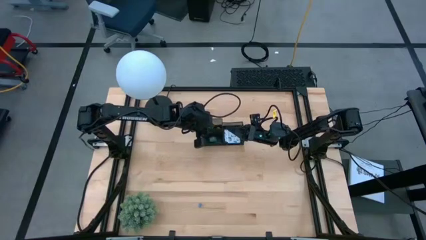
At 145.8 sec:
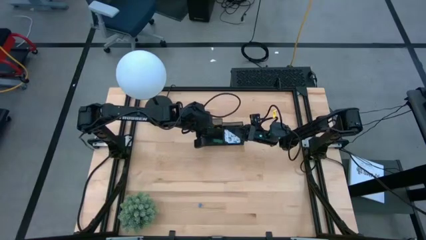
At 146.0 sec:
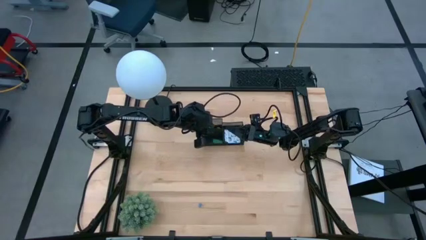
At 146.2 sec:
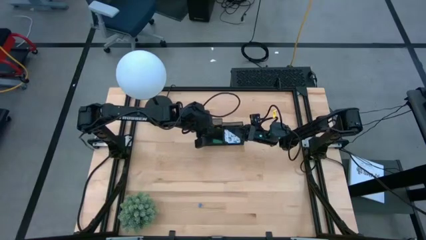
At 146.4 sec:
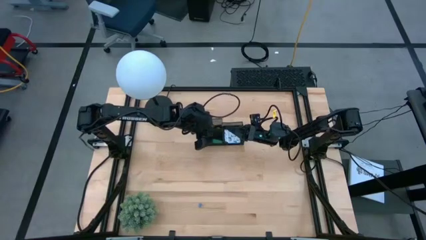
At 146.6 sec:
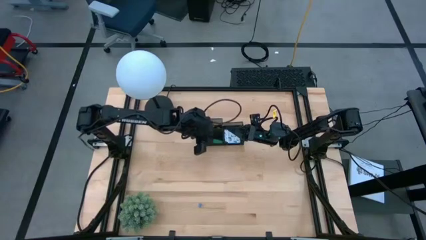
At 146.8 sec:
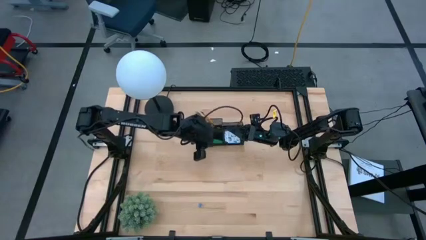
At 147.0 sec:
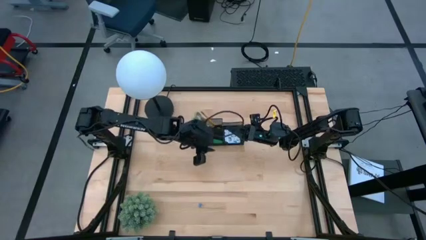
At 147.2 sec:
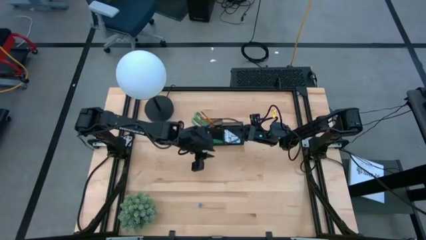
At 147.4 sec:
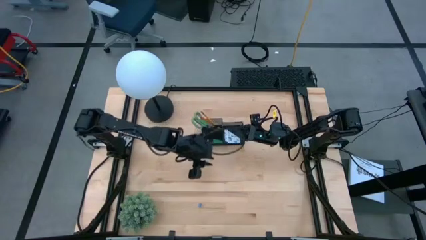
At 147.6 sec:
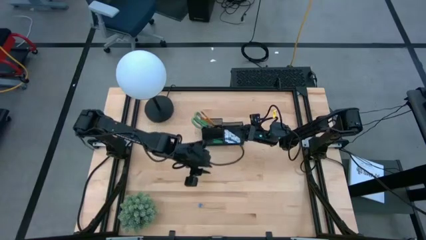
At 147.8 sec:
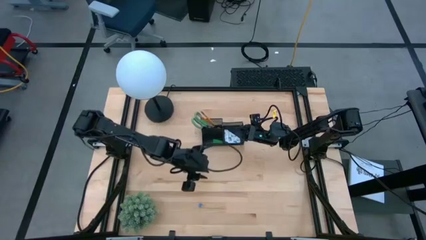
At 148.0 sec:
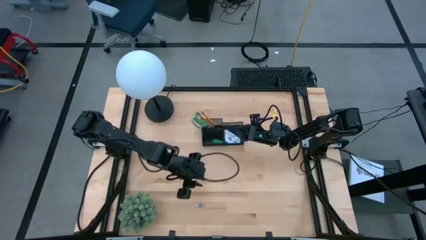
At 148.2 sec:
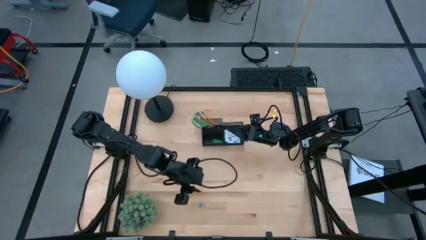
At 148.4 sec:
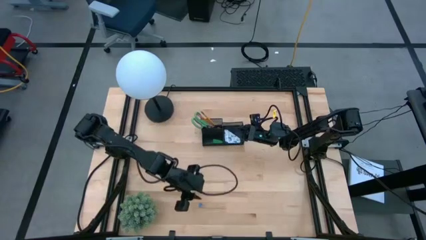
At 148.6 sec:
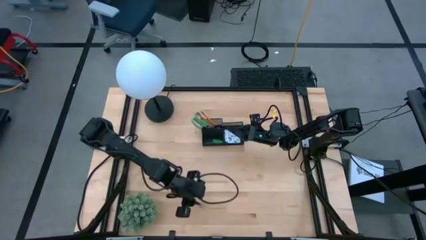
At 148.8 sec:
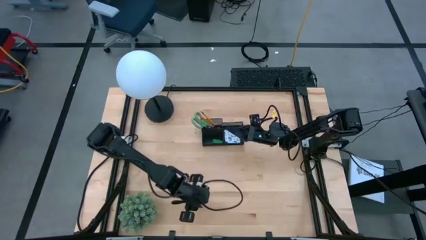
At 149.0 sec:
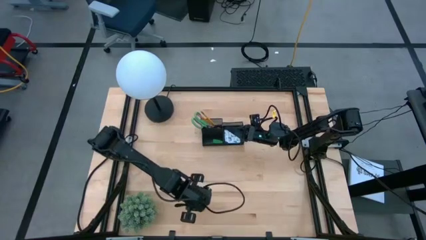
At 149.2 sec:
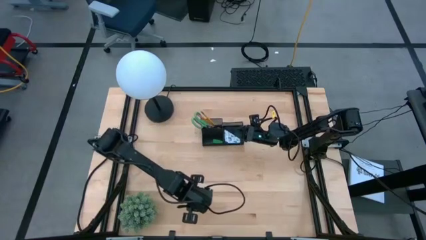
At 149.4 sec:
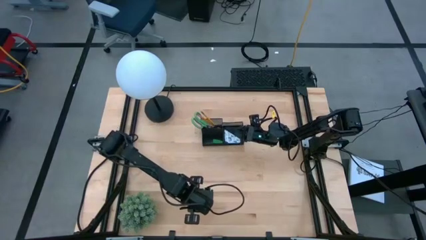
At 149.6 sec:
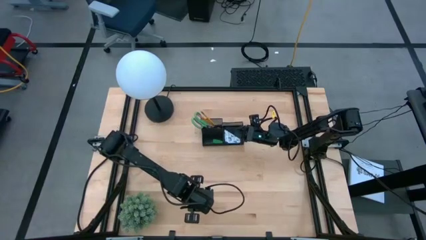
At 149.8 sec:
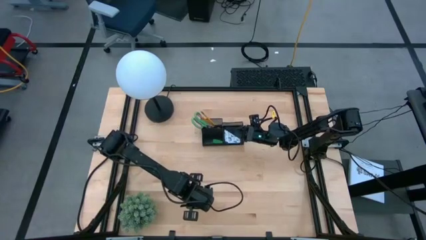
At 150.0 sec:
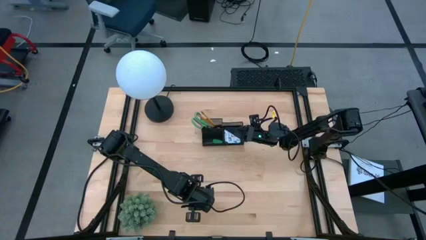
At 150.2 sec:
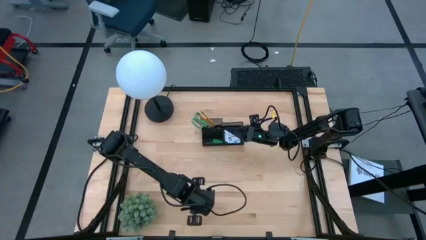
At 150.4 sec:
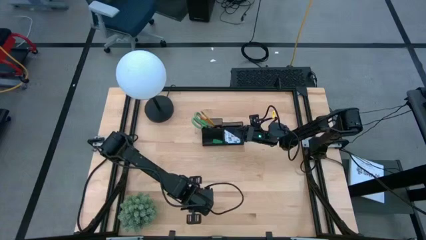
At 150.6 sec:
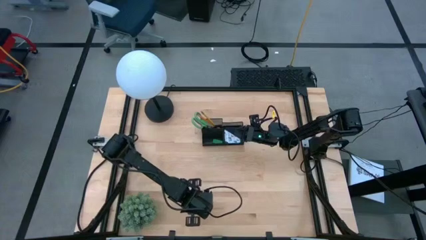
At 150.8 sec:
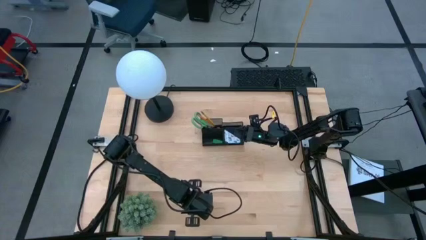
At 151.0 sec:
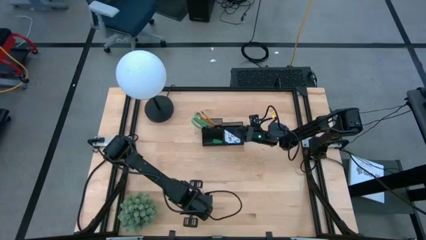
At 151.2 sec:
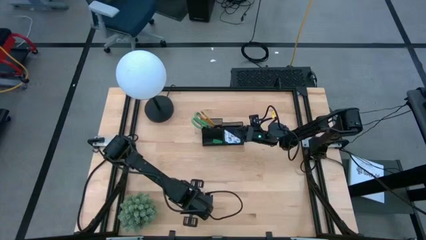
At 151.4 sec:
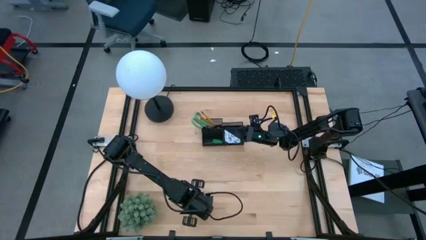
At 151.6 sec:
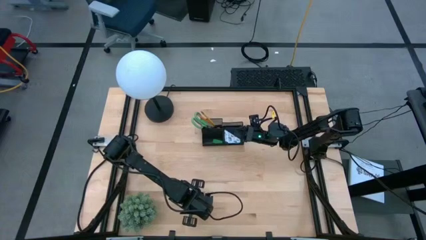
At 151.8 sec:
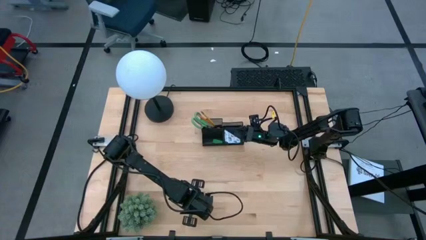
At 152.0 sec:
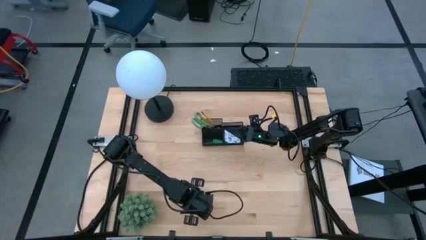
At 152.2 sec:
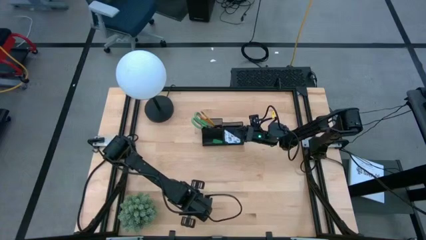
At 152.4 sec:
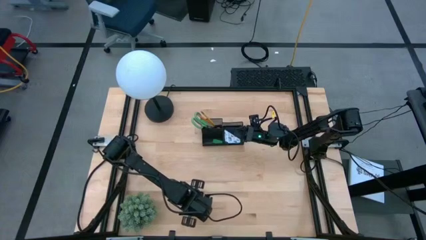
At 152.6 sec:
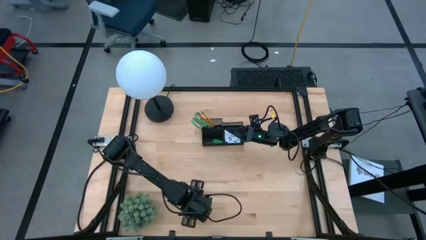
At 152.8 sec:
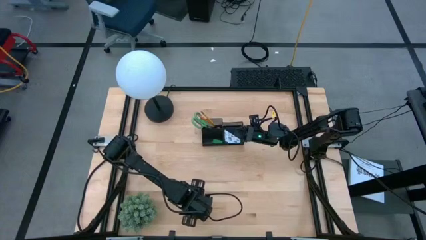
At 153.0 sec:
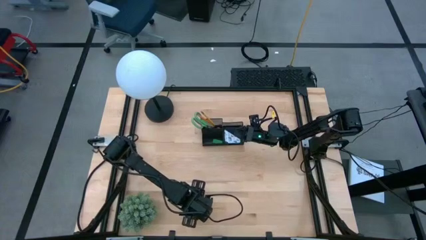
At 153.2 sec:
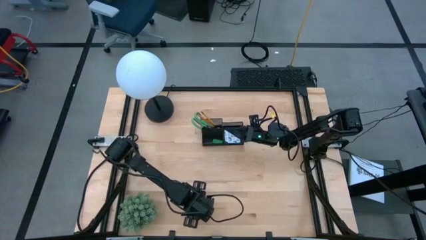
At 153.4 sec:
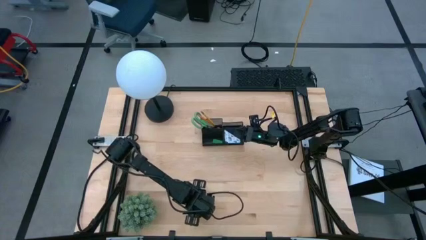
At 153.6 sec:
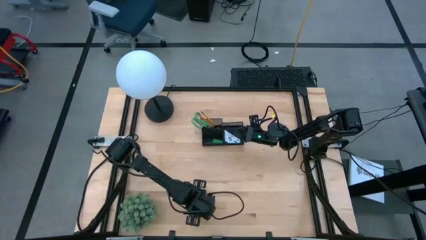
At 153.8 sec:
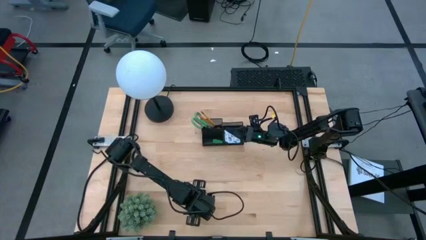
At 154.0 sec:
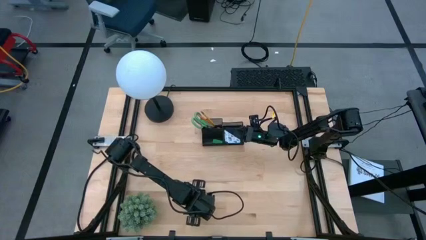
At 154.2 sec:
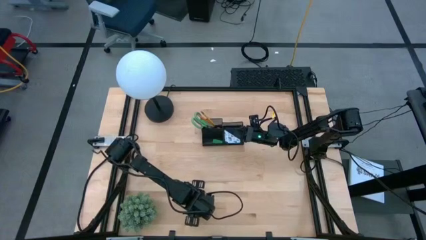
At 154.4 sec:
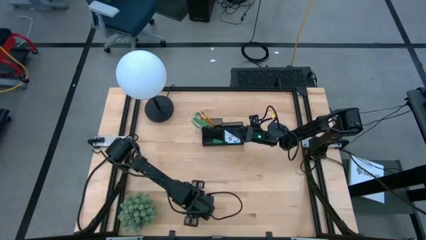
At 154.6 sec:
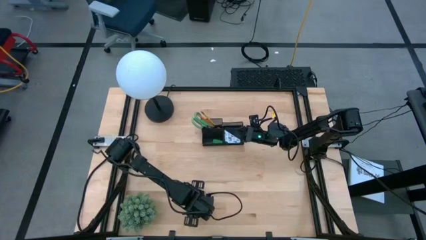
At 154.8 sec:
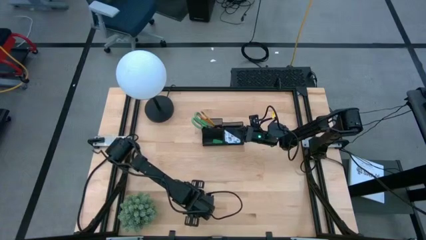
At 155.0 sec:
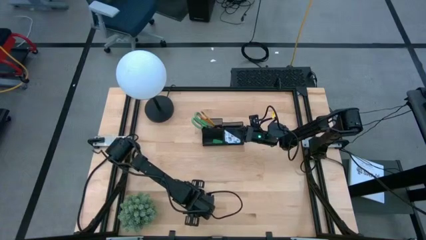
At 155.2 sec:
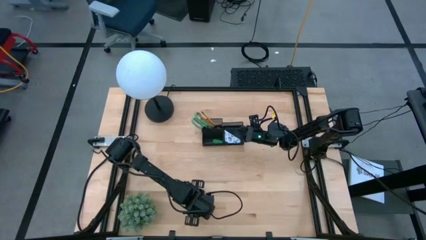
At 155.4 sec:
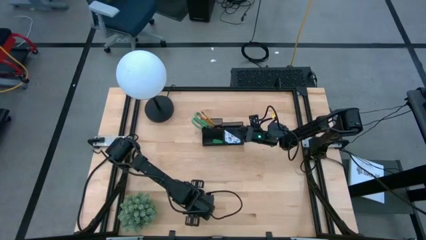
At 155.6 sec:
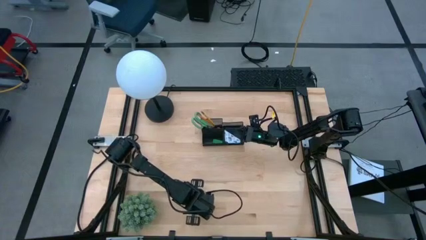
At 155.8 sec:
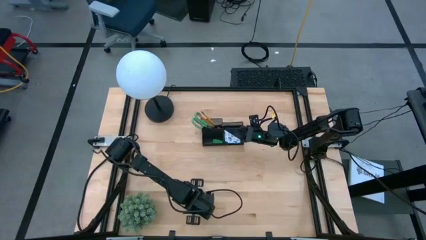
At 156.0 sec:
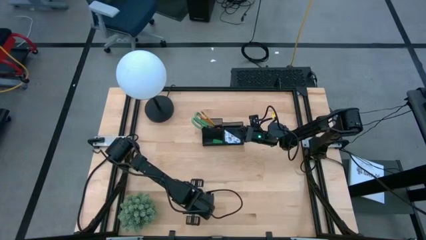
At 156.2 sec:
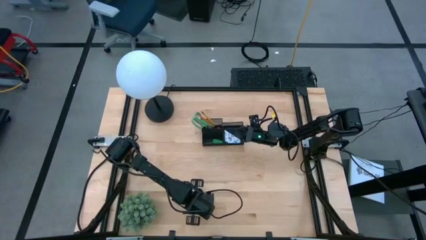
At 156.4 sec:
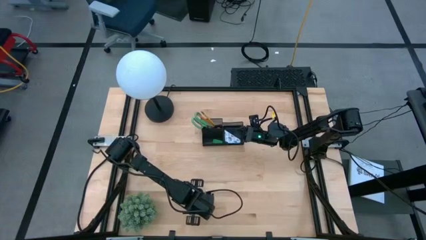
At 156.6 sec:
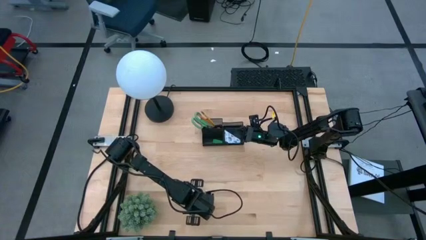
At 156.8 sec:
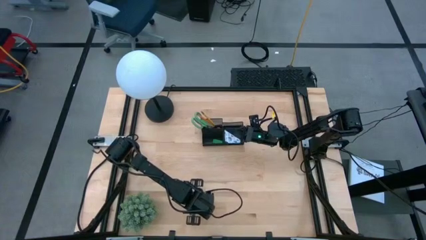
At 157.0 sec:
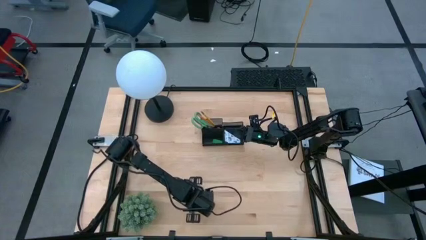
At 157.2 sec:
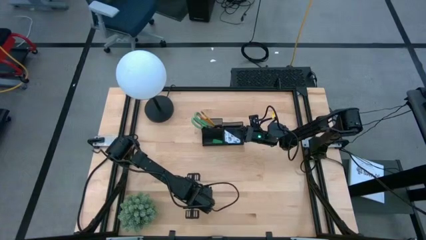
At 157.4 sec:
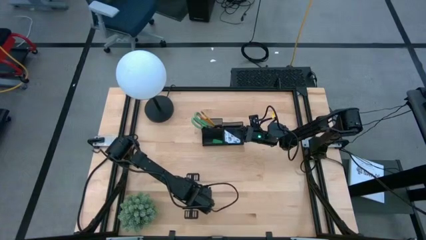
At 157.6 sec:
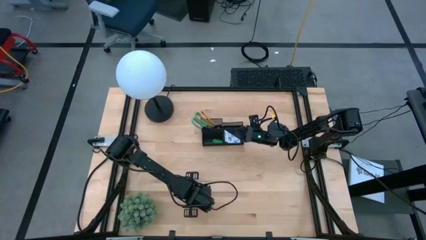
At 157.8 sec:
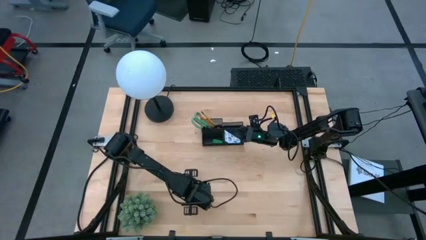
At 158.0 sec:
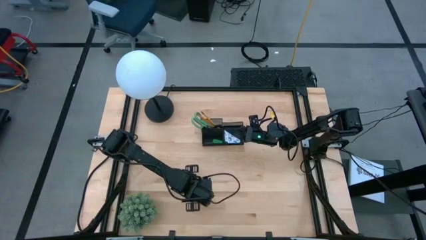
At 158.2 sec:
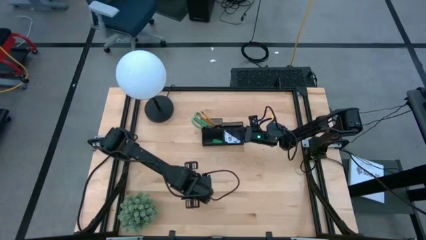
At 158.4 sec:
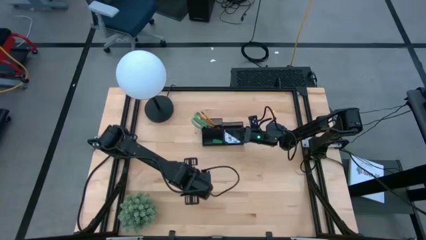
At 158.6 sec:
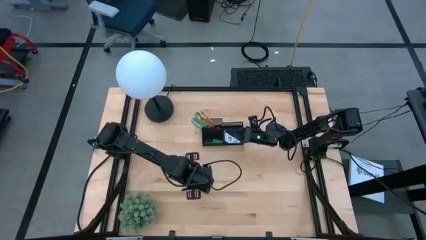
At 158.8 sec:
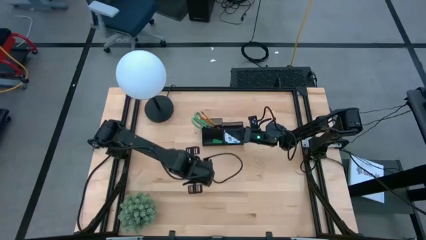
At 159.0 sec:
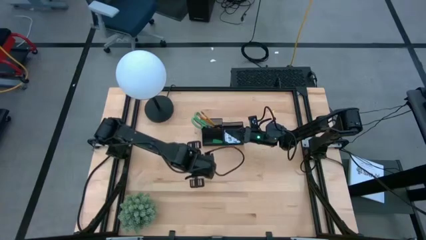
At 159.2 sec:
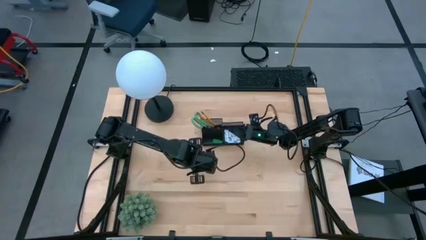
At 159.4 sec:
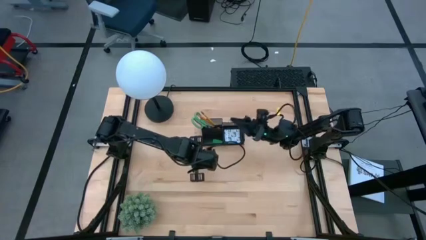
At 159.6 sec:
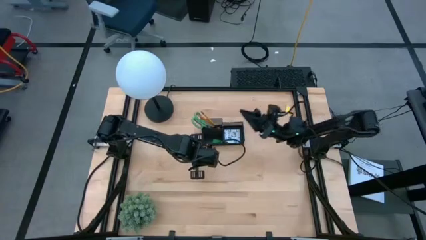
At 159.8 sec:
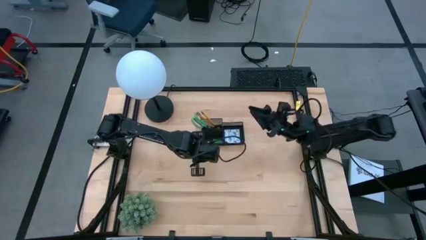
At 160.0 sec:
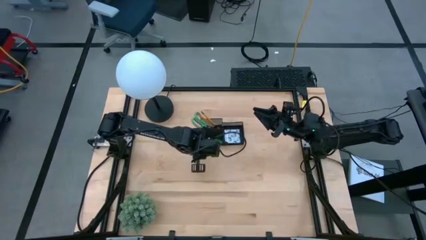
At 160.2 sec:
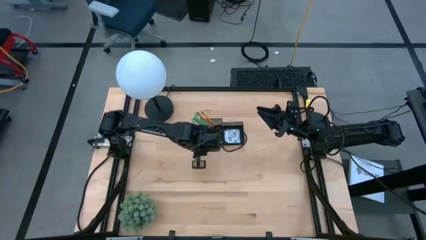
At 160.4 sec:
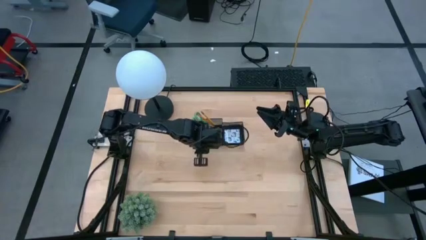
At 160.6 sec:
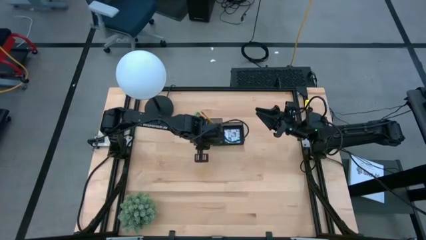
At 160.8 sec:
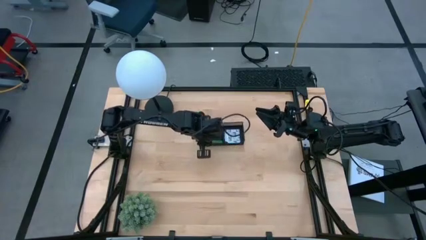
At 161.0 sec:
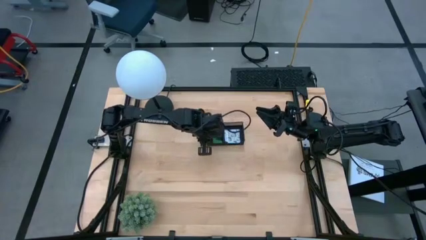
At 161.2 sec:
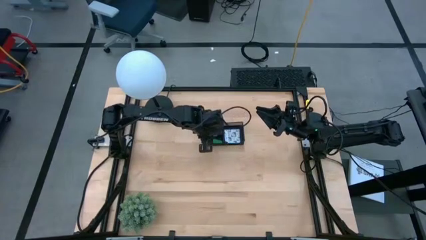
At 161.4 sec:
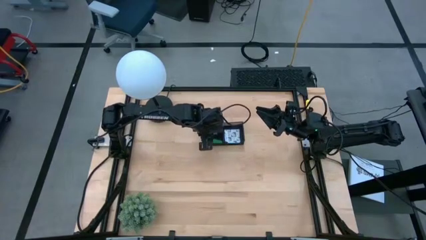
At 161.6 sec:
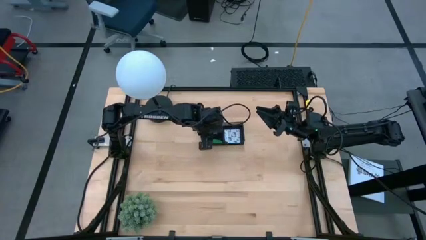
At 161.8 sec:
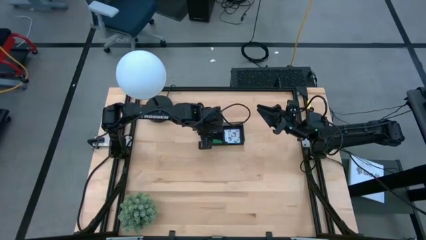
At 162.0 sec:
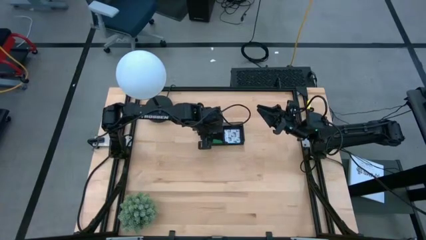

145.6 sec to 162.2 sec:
Task: Pick and place office supplies into organizer
Put the blue binder clip into the black desk organizer

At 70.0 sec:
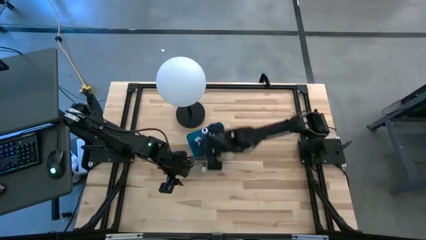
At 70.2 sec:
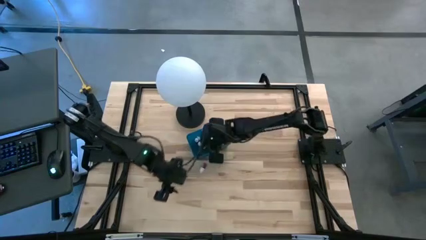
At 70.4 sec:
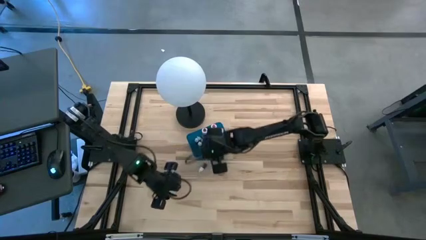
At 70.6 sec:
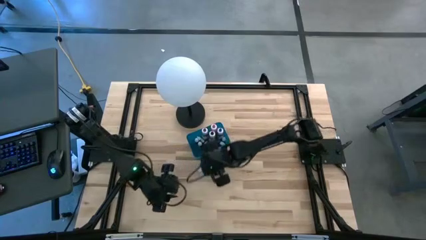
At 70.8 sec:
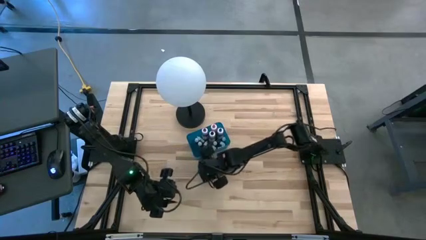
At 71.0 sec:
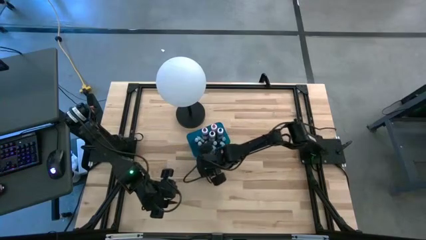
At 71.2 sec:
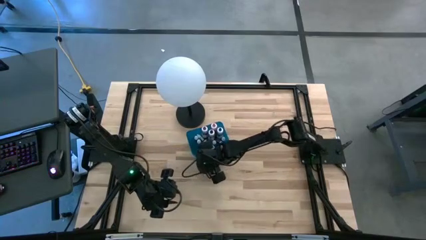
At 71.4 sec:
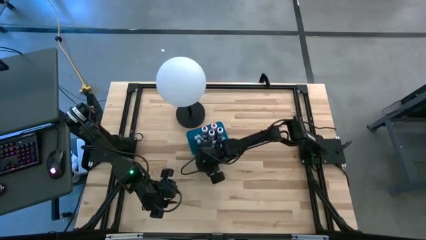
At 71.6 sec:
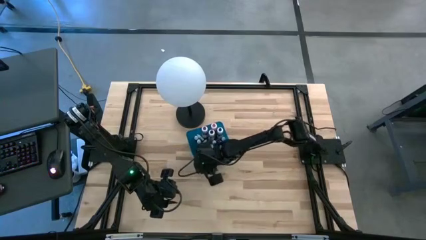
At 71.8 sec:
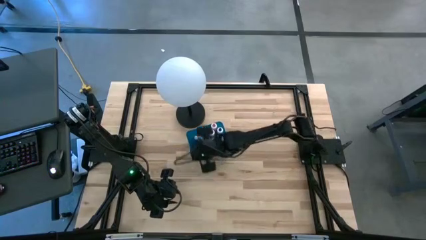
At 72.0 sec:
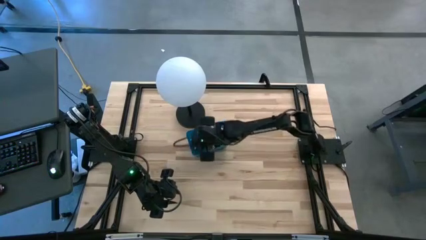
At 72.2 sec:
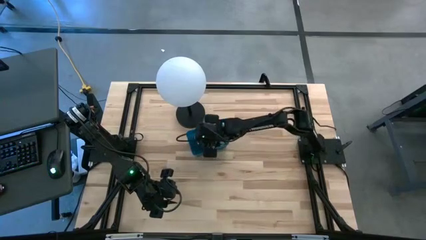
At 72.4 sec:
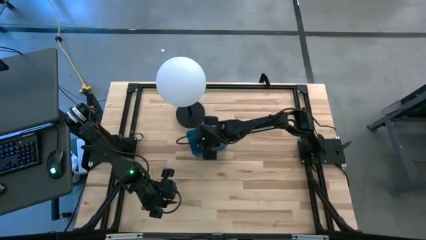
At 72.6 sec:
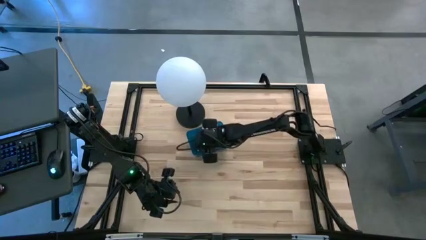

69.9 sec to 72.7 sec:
Task: Pick & Place food coloring
Put the small red food coloring bottle into the blue container
